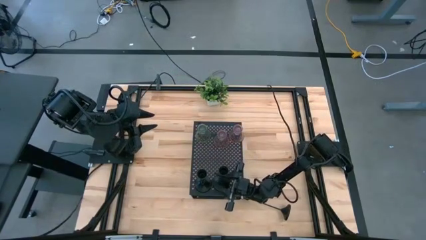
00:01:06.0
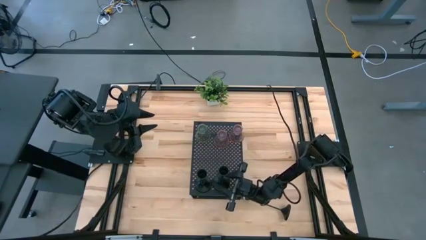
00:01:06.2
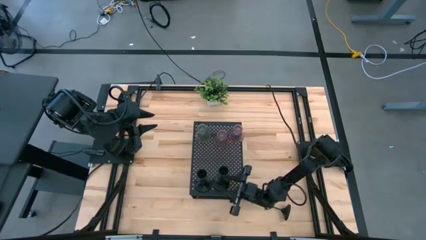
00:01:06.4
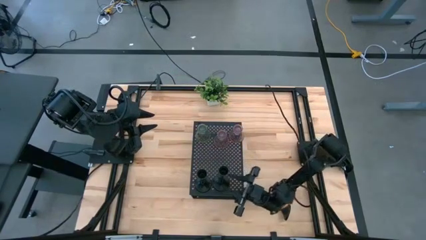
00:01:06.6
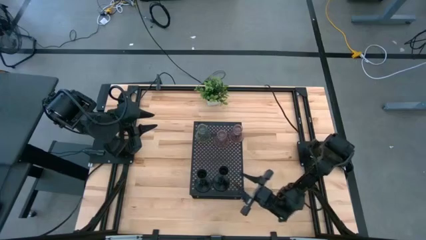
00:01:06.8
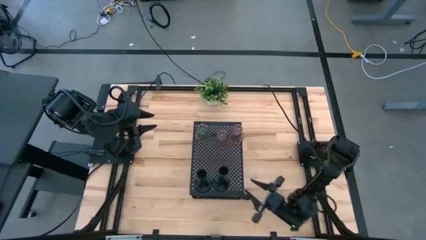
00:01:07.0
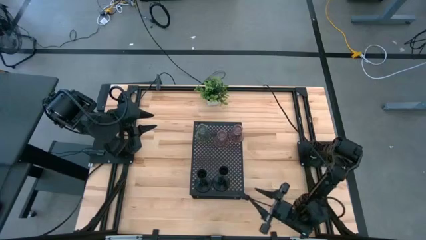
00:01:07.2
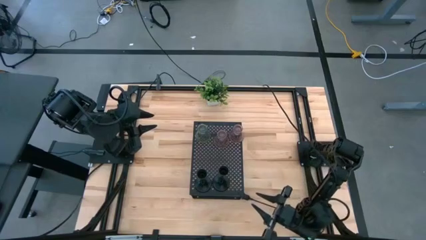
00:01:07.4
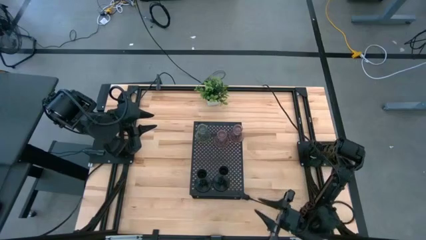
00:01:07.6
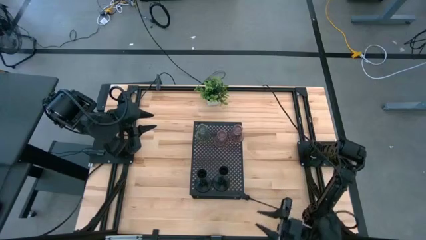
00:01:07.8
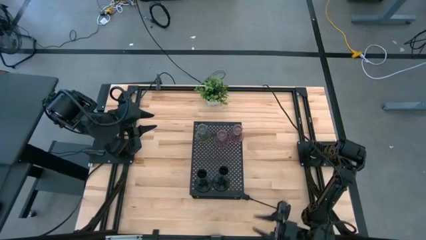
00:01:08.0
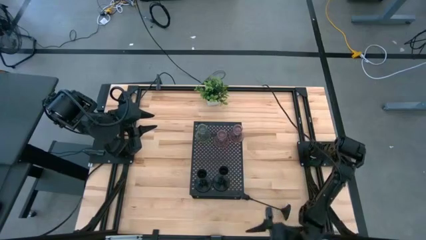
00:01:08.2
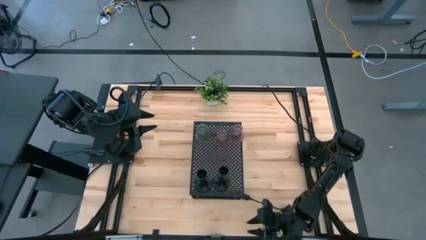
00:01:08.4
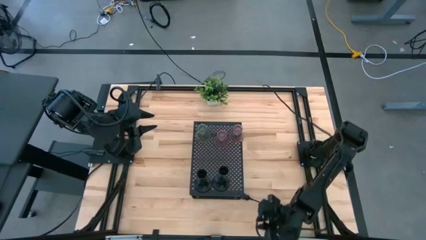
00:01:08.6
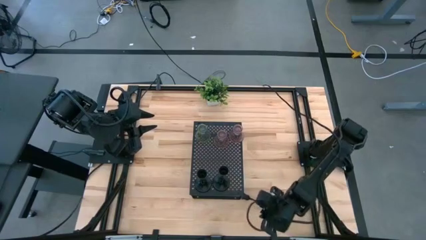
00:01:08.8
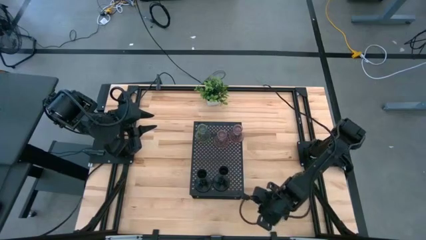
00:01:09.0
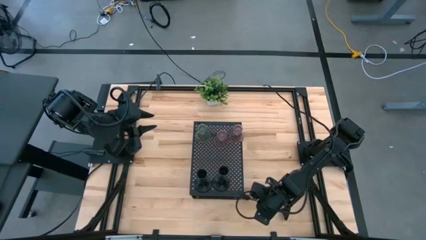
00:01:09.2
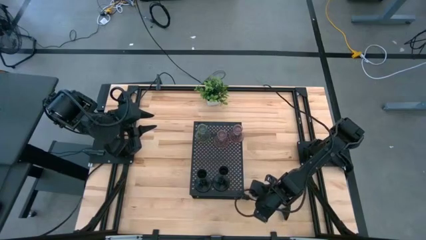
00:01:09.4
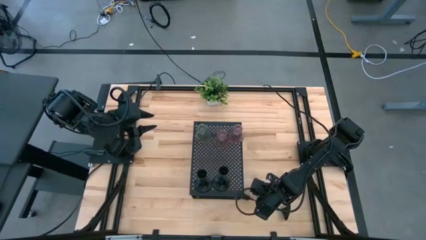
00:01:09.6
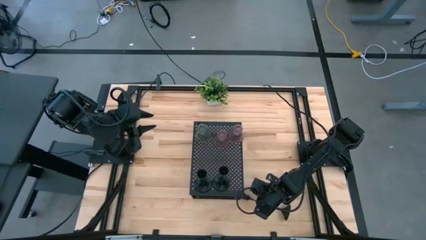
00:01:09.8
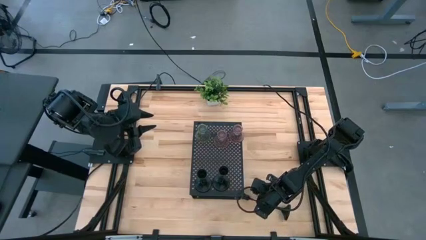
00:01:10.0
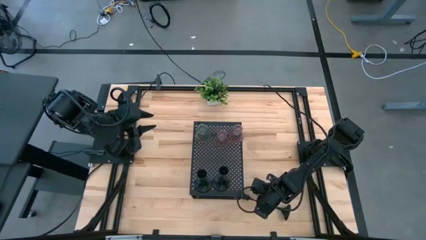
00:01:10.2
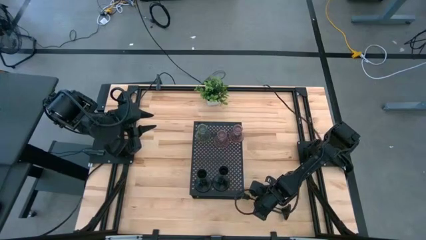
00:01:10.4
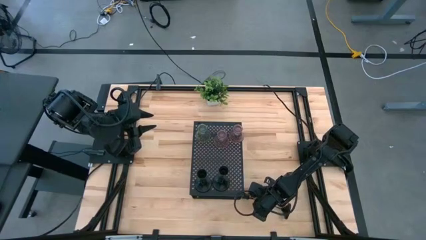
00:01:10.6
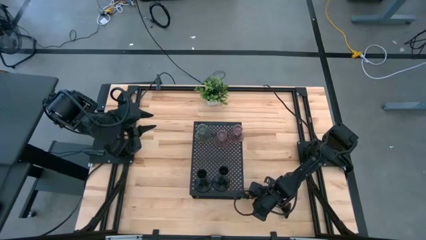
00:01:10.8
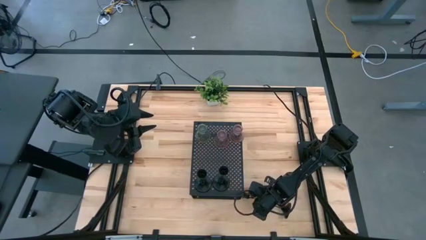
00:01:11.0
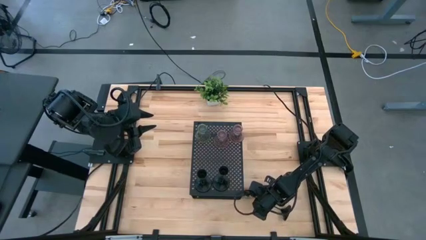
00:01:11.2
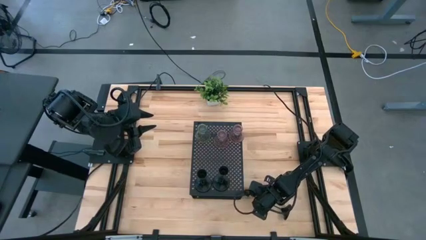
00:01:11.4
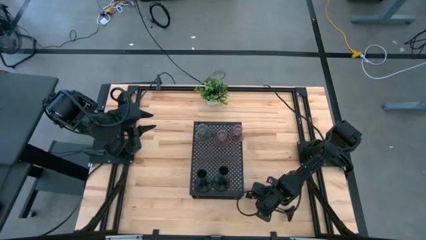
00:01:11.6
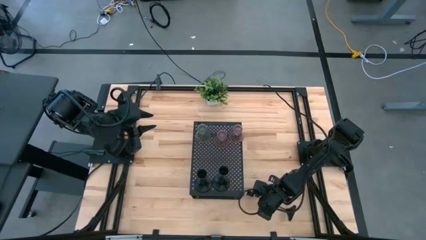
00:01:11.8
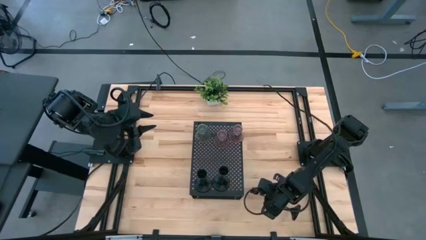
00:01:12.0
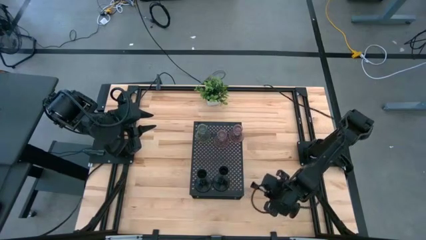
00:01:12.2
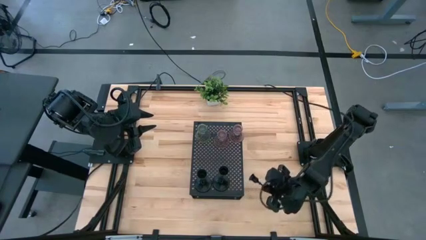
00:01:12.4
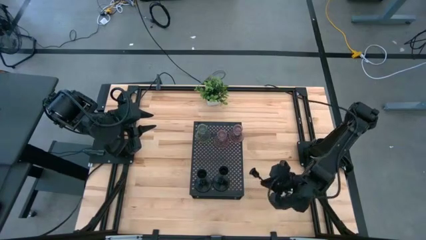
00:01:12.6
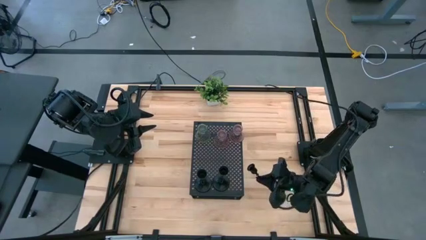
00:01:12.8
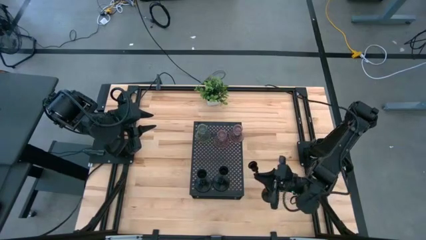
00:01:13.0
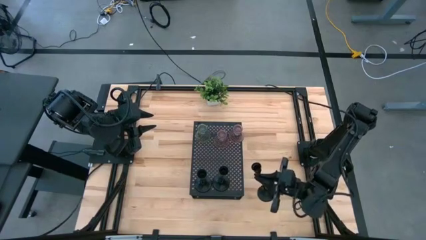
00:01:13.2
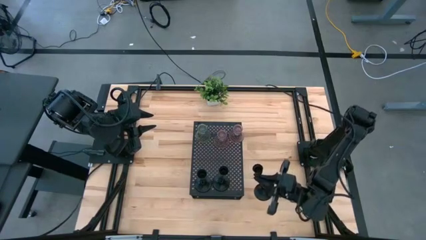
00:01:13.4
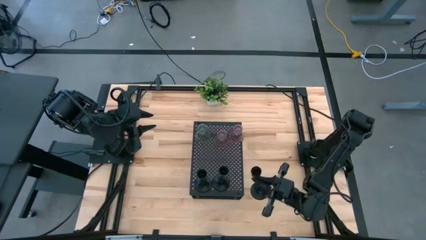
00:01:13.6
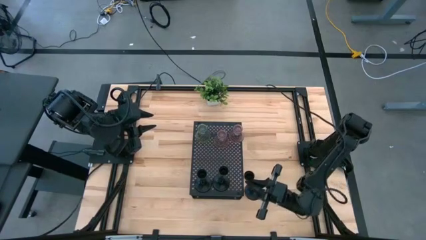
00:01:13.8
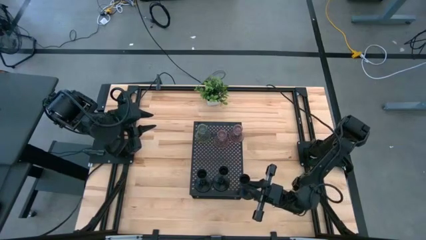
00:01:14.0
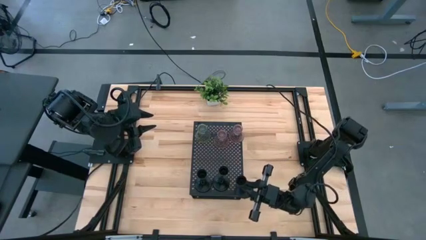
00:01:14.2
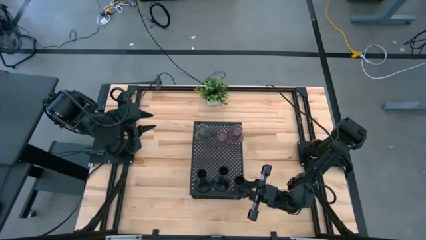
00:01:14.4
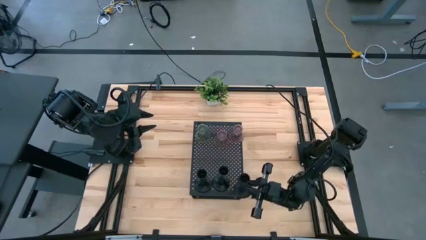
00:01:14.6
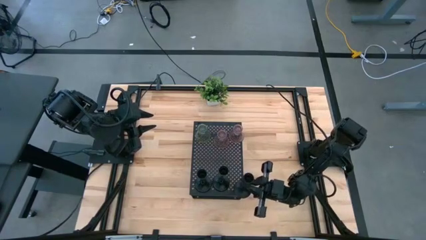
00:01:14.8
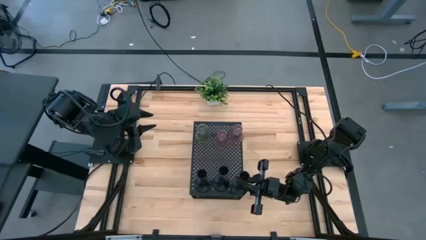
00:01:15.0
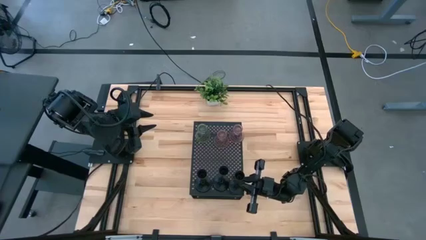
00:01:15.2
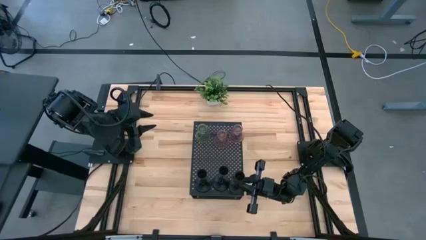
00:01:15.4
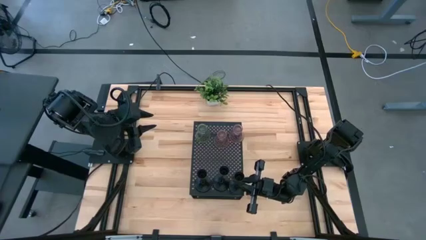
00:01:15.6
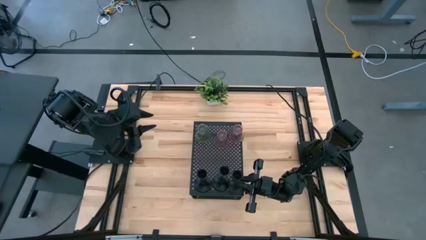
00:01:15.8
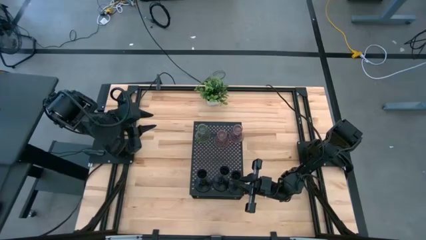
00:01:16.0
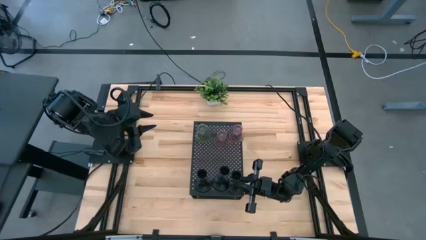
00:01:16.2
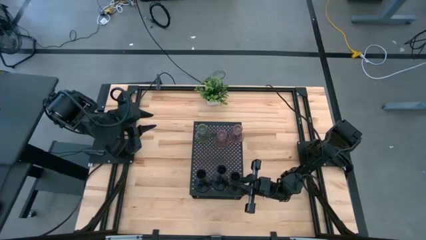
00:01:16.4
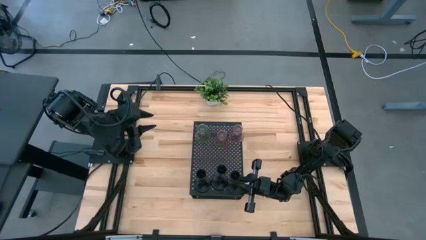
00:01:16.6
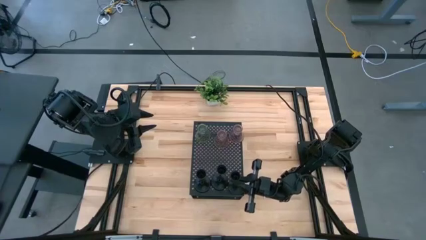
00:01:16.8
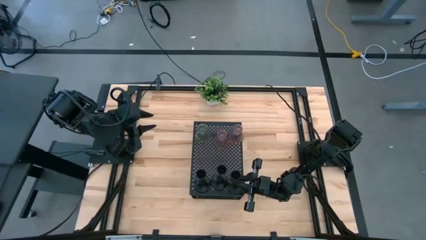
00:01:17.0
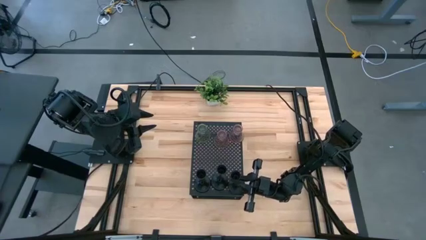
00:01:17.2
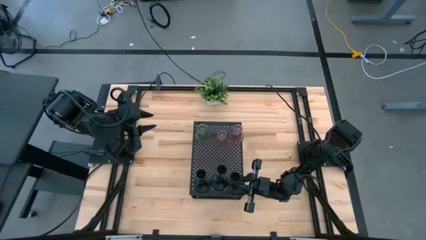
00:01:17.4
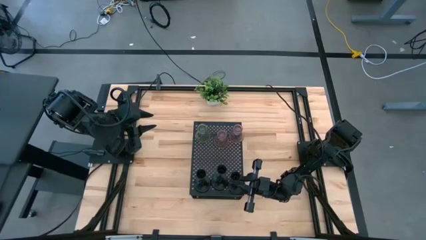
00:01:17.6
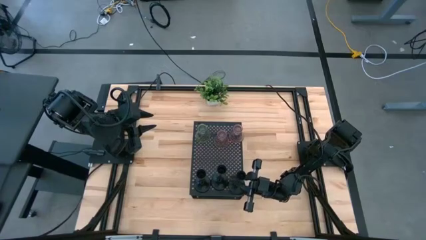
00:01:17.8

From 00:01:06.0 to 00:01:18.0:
Task: Pick & Place candle stick holders
Align the black candle holder with the black candle holders on the shelf

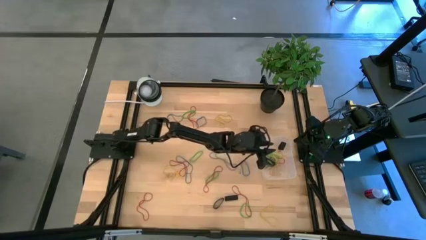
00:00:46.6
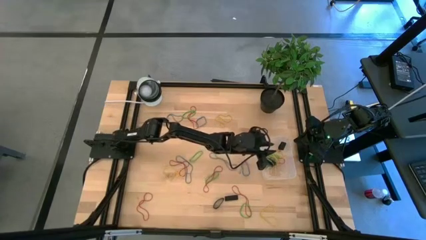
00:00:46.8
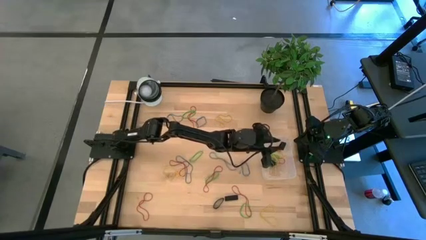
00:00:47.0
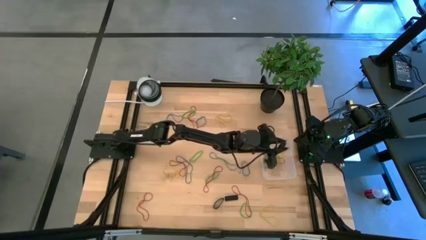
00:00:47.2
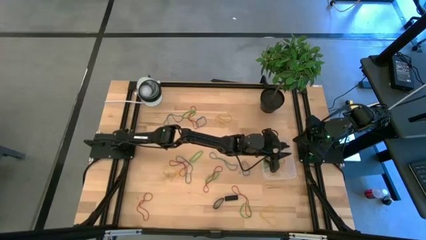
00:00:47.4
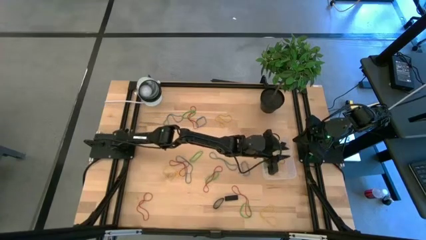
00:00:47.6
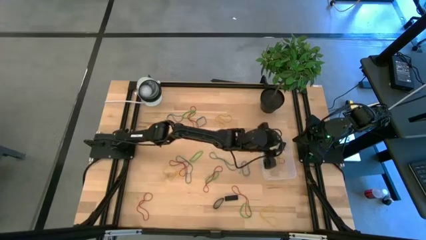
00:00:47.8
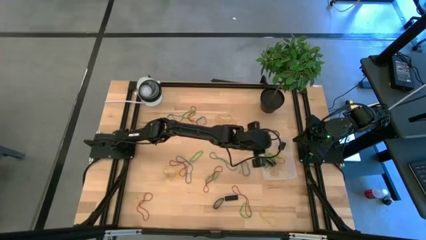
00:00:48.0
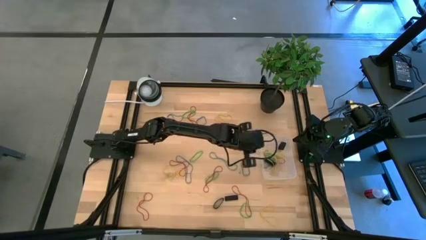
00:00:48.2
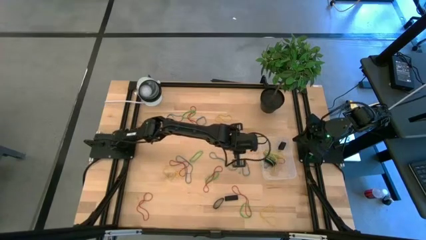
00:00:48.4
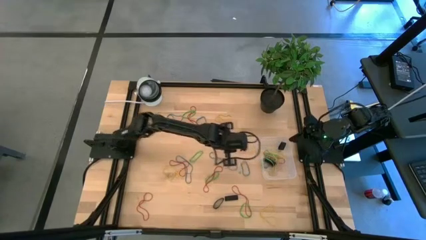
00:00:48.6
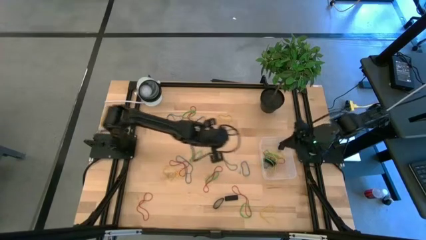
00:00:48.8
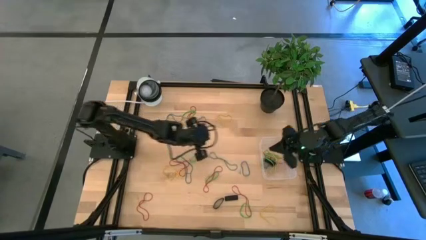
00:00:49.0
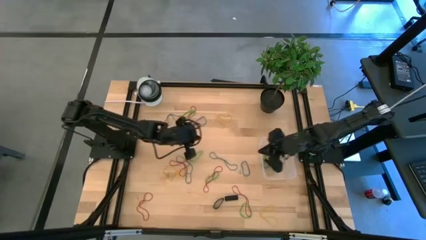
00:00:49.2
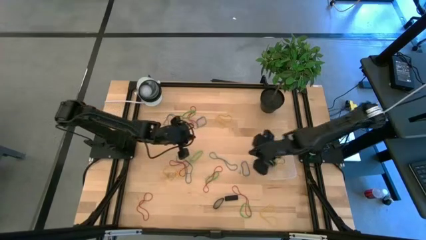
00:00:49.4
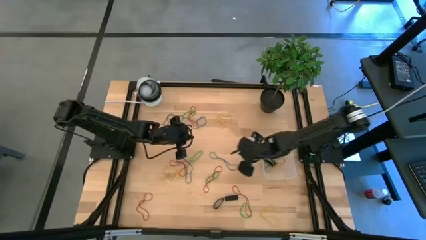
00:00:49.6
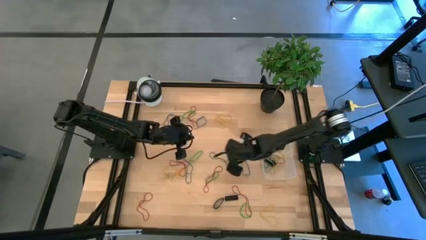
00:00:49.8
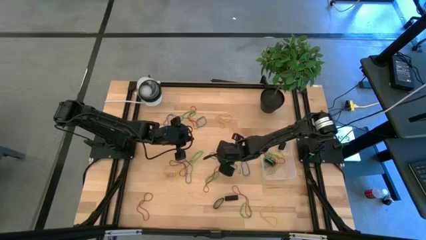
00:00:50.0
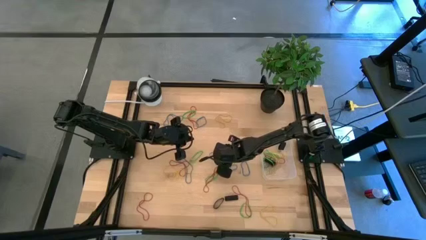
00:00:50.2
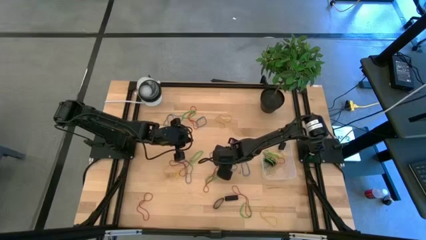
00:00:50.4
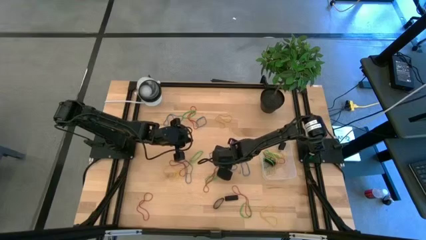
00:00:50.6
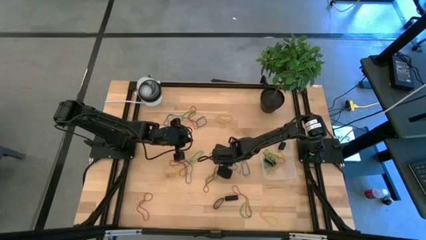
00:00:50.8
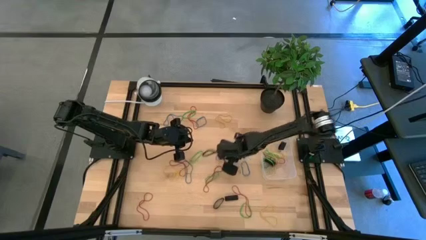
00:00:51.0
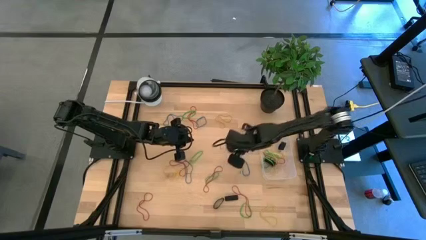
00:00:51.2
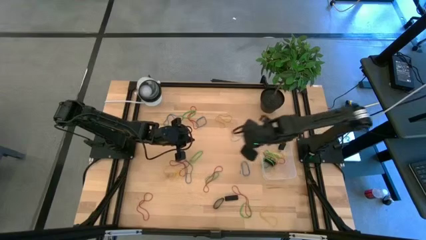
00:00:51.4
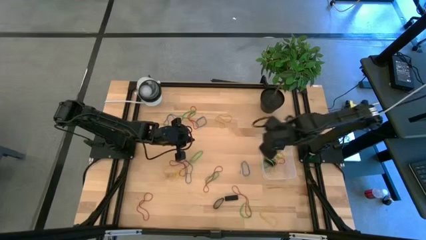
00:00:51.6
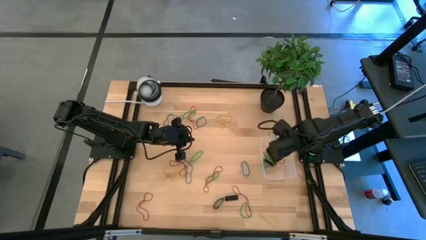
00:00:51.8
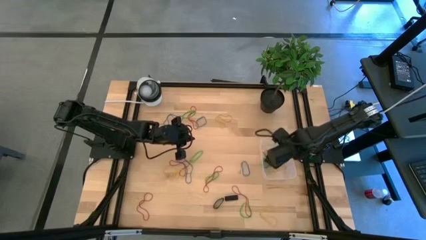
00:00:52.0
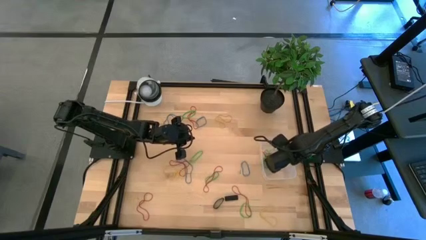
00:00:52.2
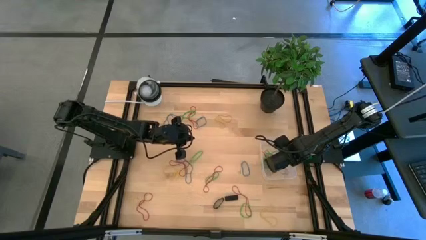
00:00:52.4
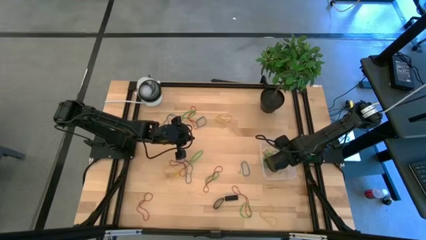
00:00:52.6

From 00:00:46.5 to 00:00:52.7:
Task: Pick and place rubber bands into bin
Put the blue rubber band into the transparent bin
